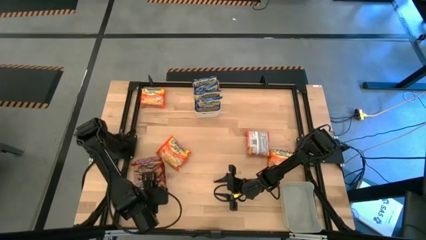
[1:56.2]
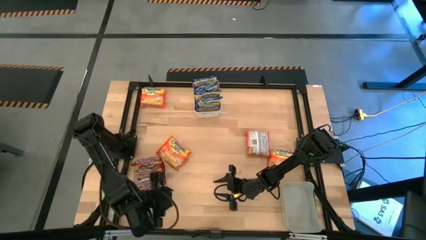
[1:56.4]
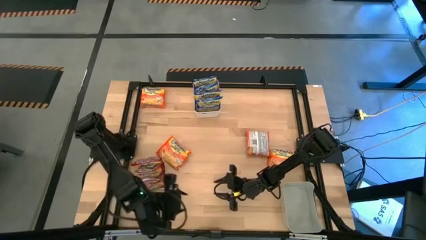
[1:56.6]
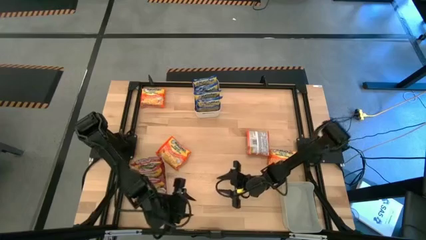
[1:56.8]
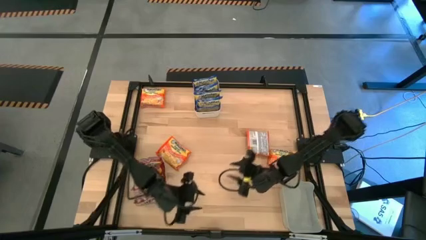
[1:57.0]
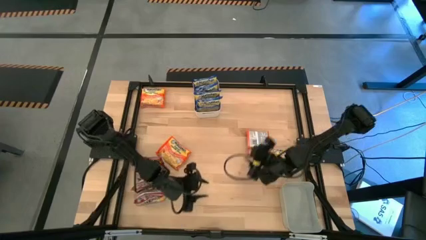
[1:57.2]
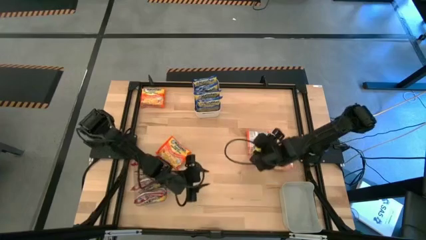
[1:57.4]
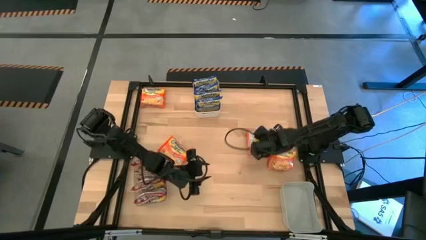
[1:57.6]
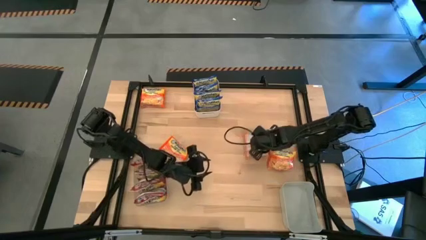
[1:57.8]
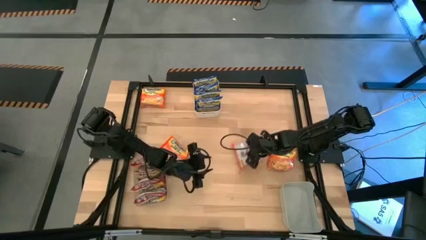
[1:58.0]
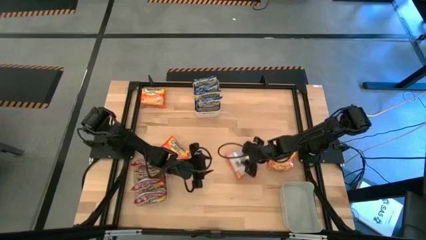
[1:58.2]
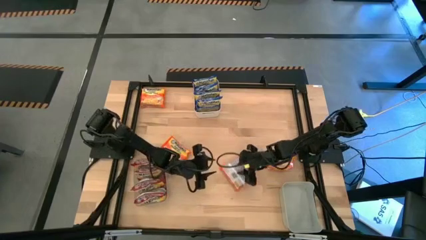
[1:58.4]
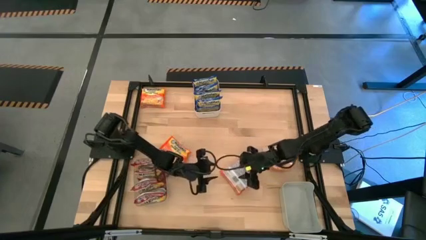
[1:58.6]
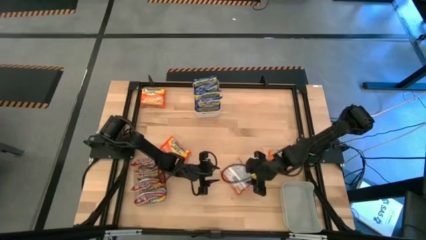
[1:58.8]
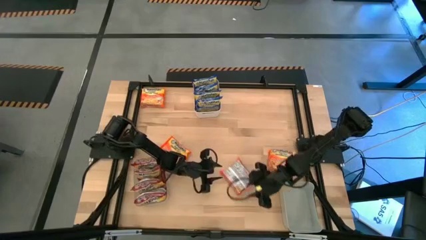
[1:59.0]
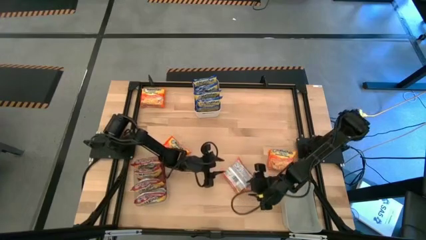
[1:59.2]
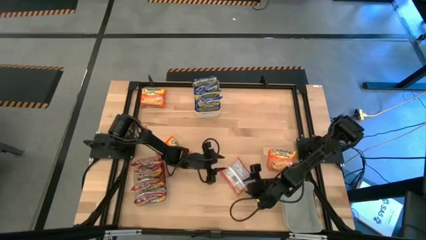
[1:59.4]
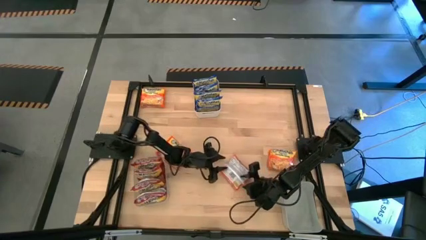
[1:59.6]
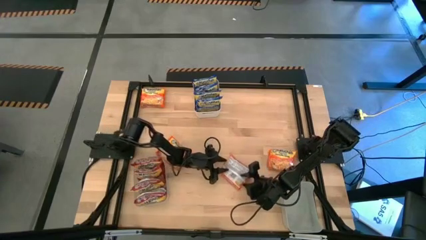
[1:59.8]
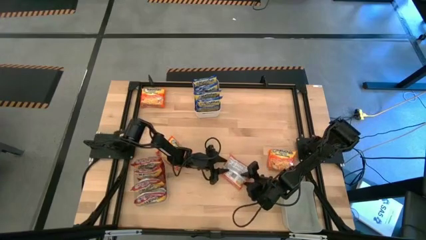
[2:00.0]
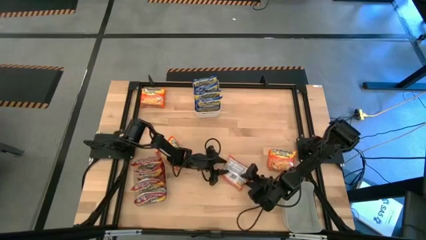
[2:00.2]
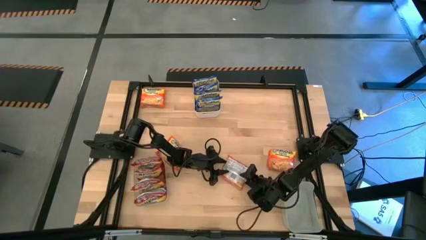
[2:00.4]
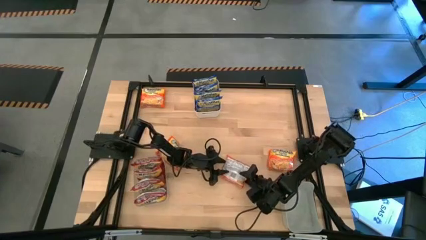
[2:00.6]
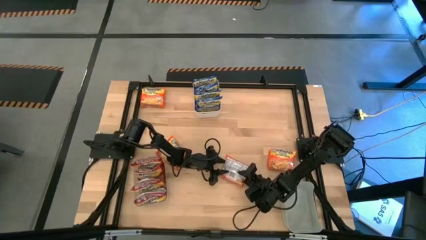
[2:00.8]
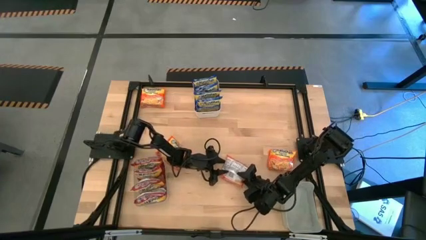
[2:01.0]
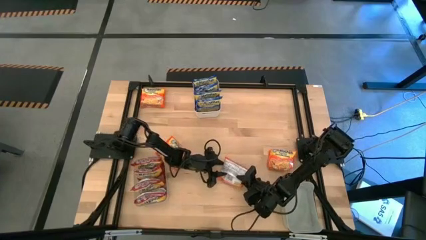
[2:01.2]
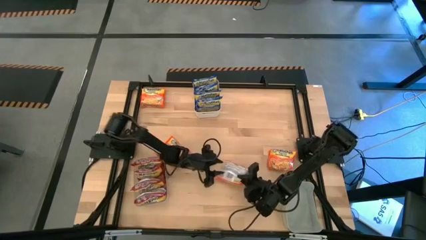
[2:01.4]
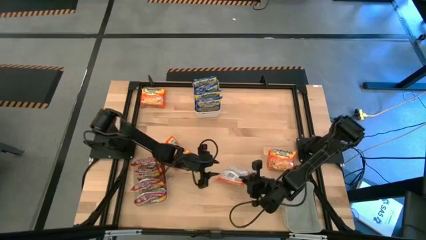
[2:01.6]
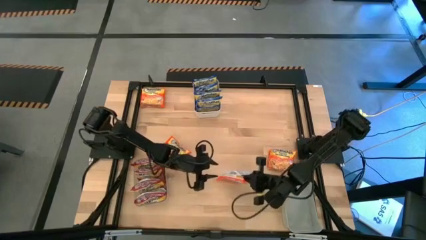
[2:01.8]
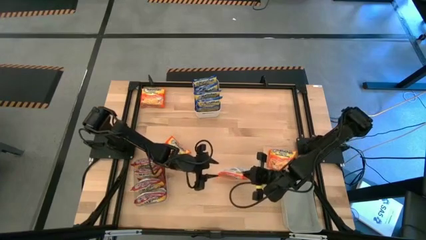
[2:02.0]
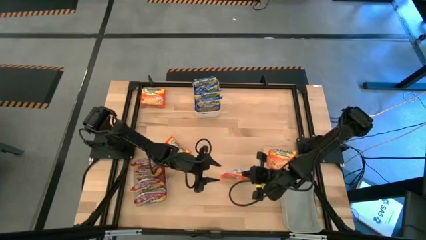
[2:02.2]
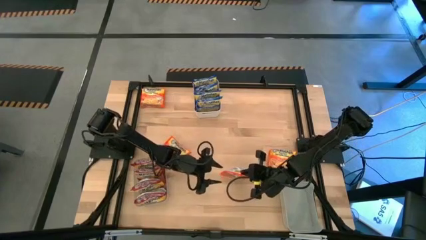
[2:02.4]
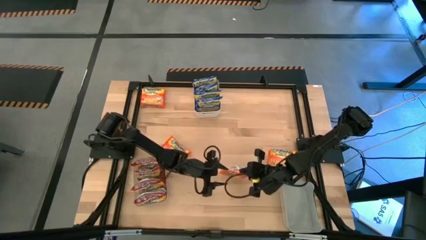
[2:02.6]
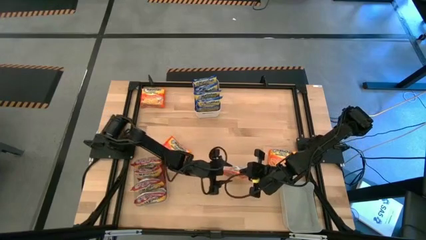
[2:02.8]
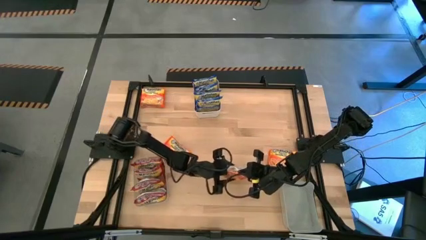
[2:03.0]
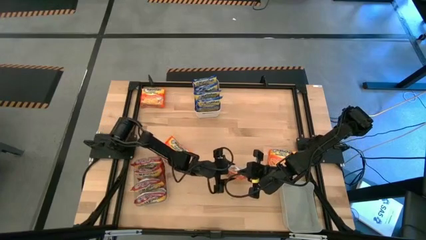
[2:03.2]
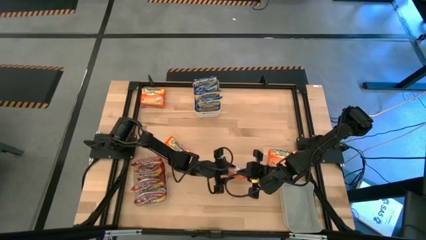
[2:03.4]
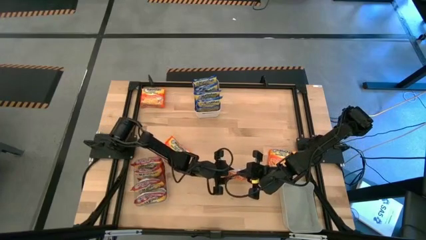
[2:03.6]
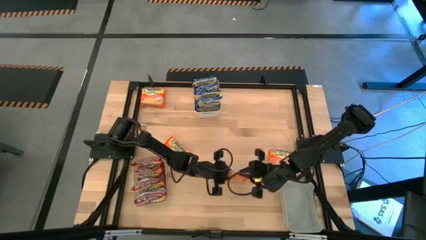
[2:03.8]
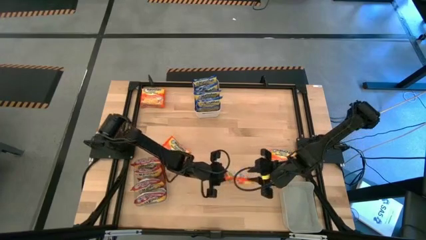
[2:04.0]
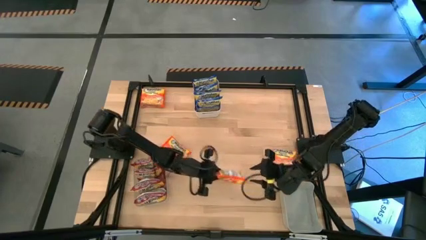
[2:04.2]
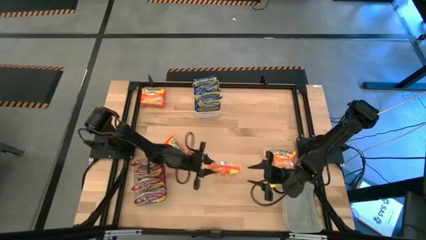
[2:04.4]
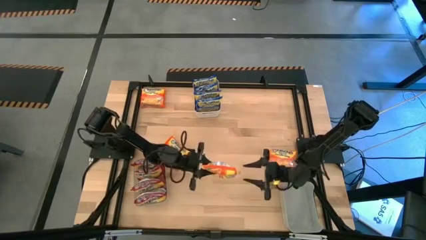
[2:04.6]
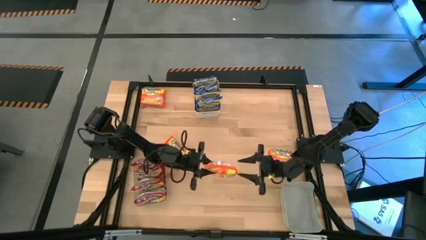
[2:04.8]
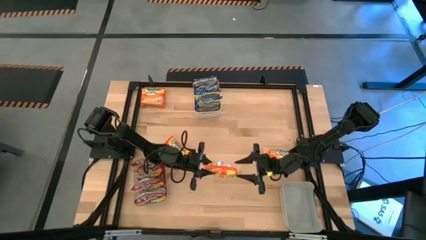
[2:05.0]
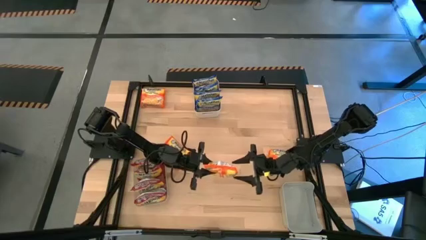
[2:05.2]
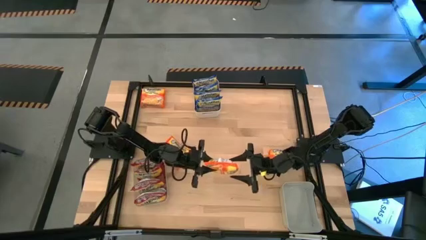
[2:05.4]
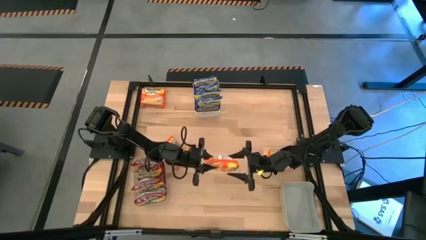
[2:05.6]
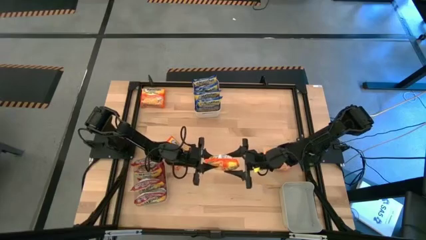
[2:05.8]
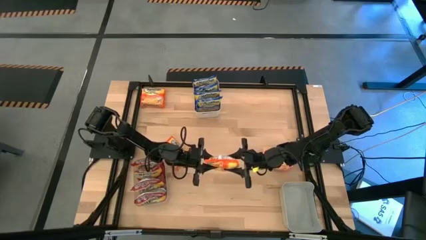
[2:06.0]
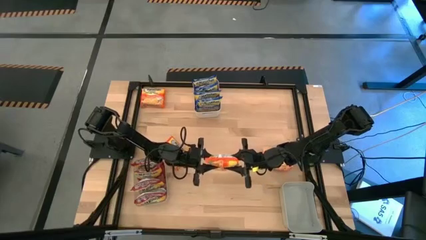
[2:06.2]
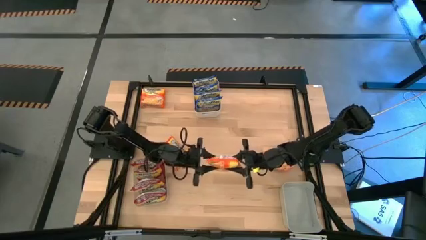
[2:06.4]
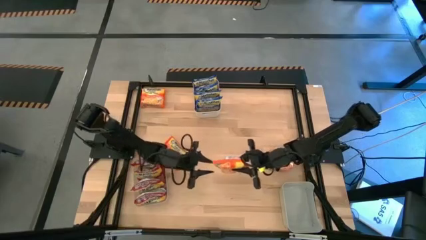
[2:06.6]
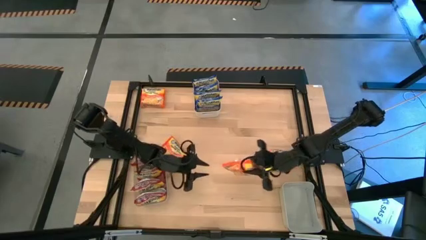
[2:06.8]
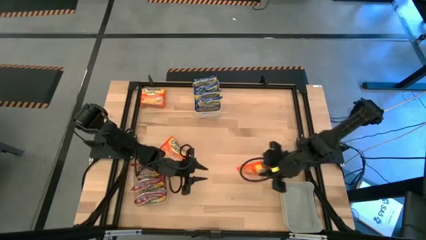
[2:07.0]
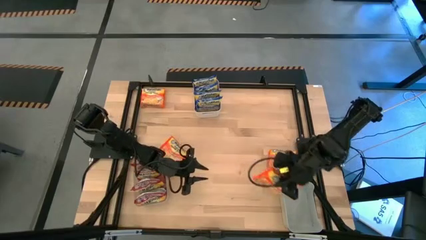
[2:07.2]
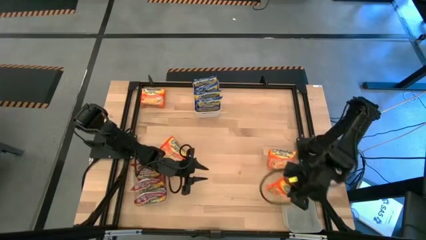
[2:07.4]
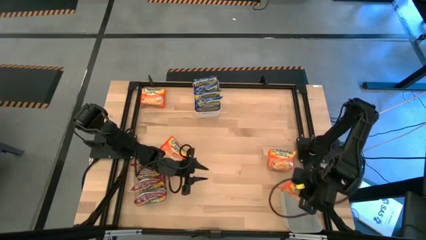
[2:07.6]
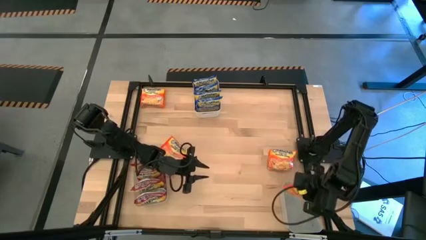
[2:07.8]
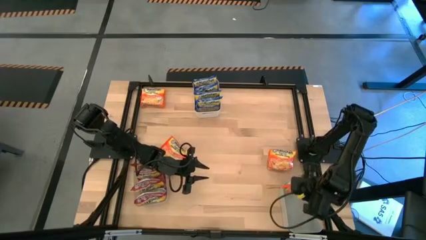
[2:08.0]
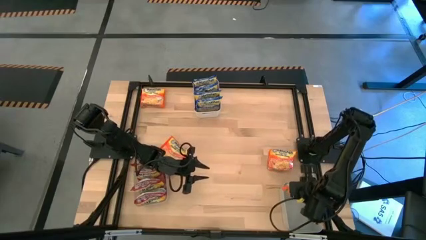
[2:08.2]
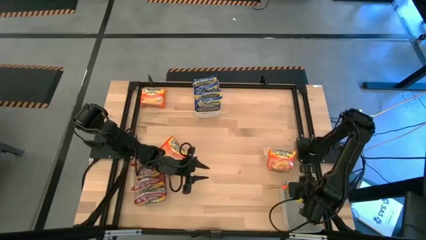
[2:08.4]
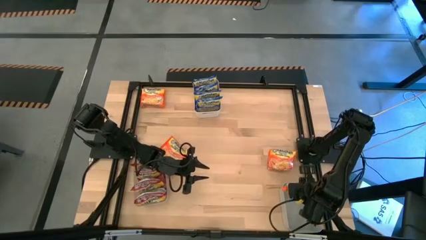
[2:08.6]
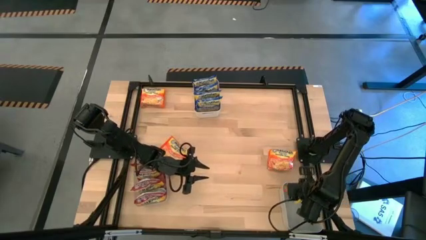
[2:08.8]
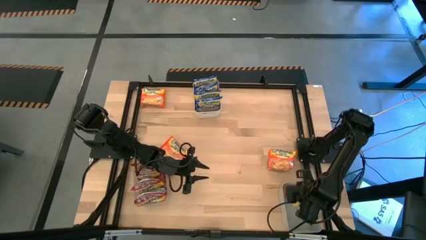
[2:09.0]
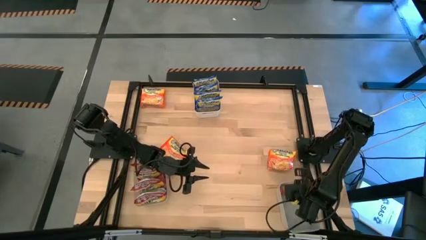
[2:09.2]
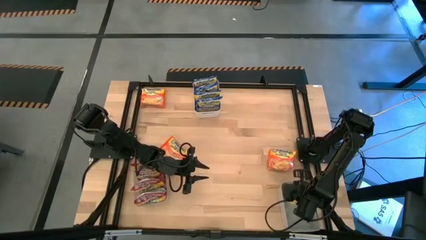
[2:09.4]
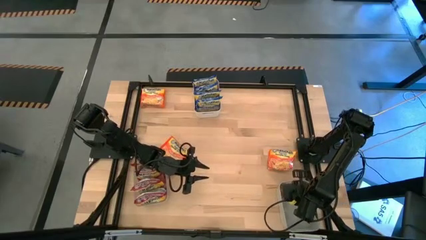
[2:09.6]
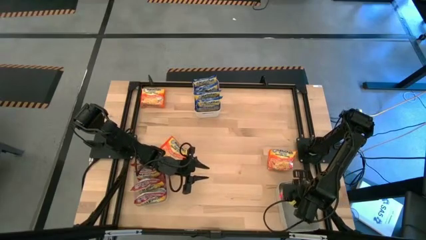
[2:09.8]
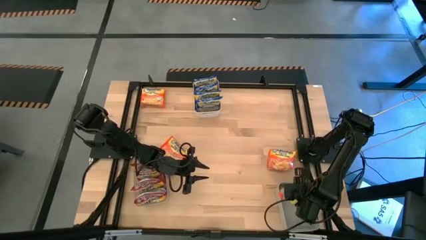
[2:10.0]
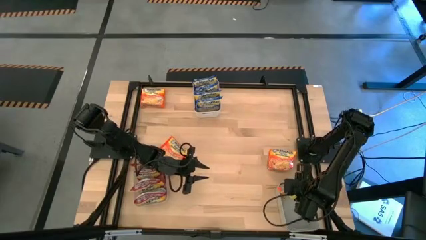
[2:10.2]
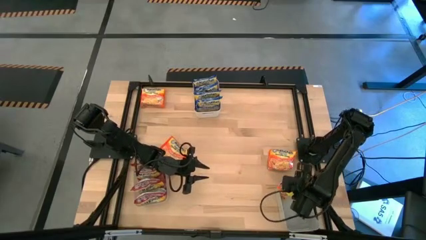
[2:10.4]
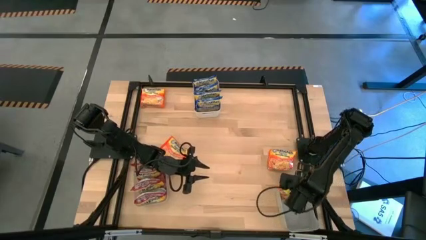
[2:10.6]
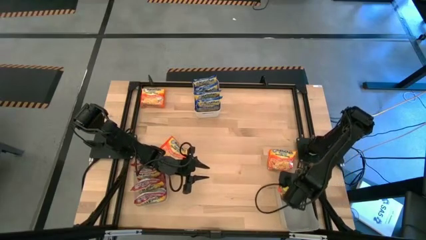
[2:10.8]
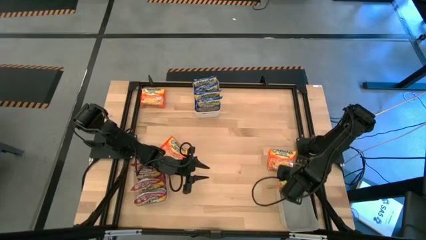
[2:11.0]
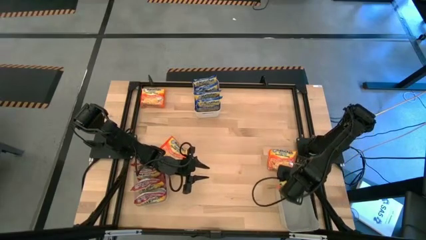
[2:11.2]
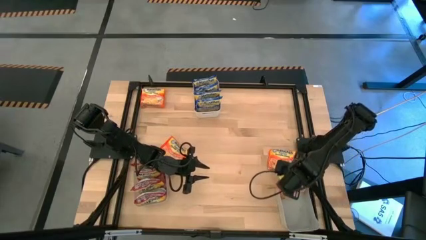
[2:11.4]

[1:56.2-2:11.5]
Task: Sort Maruchan noodles
Put the orange noodle pack into the gray bin
